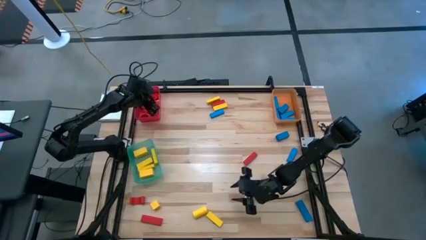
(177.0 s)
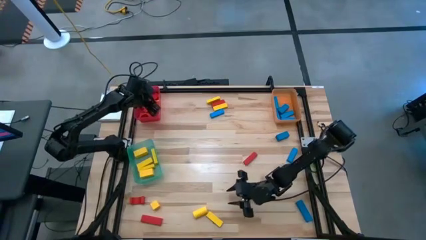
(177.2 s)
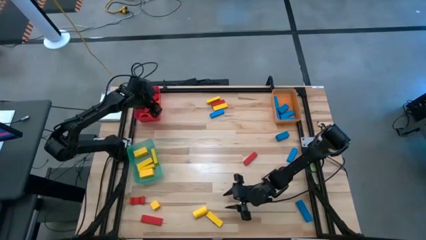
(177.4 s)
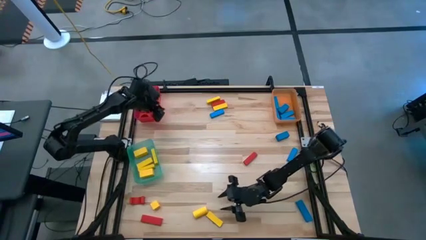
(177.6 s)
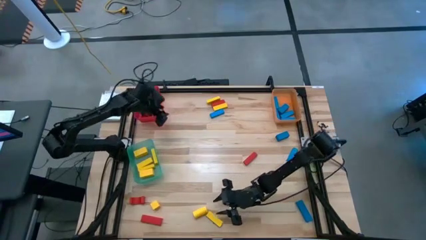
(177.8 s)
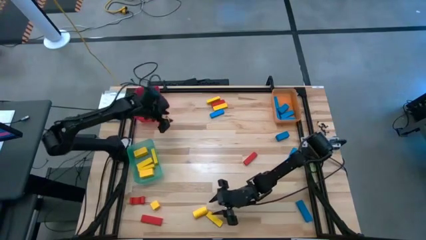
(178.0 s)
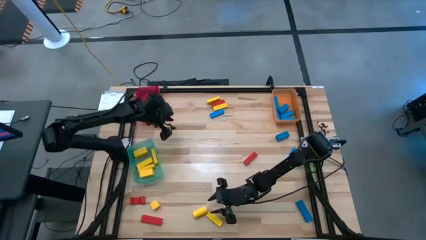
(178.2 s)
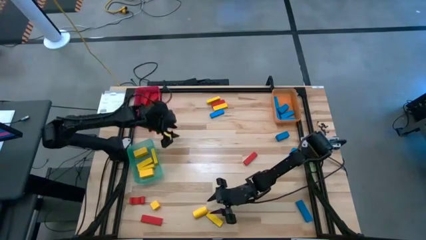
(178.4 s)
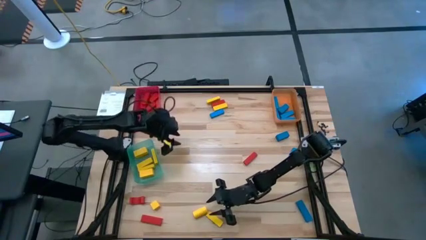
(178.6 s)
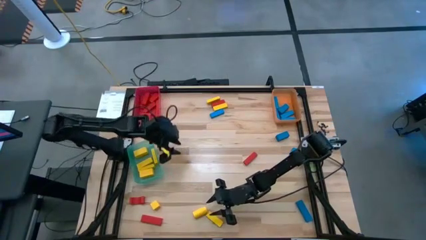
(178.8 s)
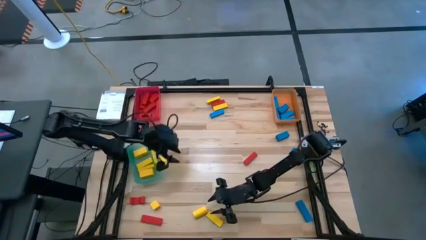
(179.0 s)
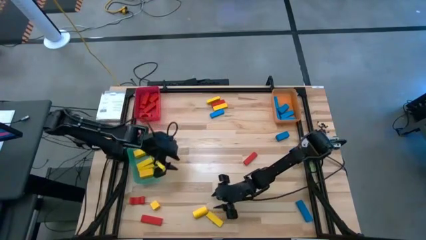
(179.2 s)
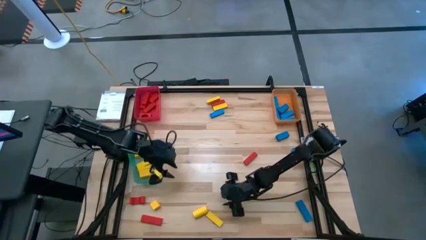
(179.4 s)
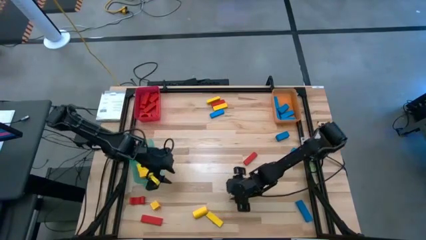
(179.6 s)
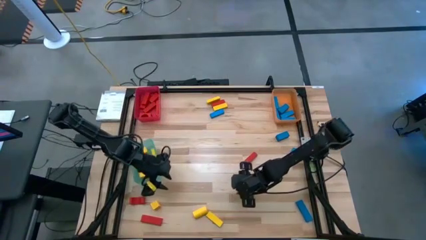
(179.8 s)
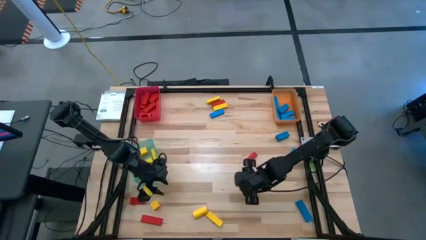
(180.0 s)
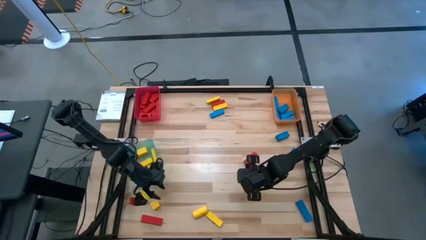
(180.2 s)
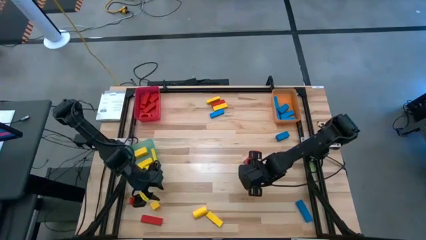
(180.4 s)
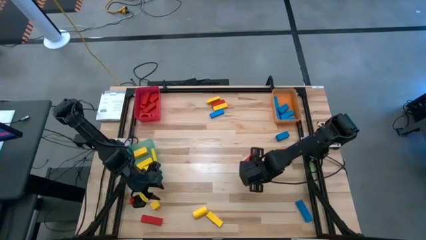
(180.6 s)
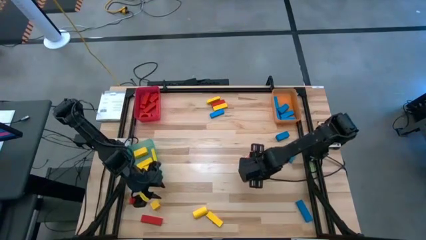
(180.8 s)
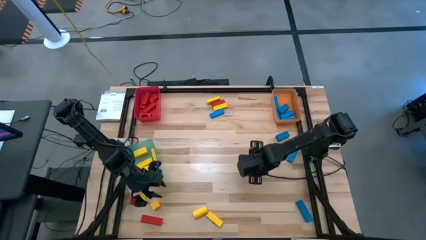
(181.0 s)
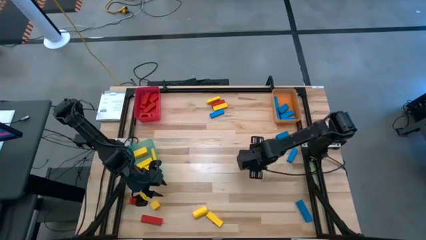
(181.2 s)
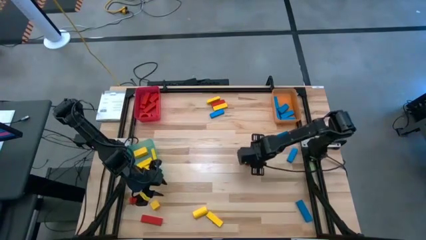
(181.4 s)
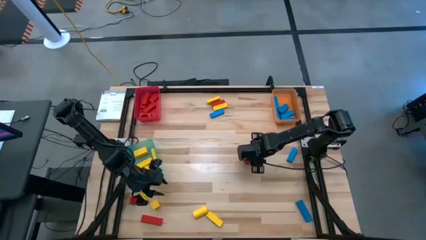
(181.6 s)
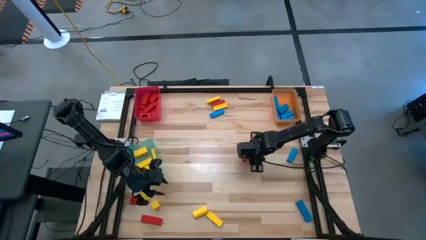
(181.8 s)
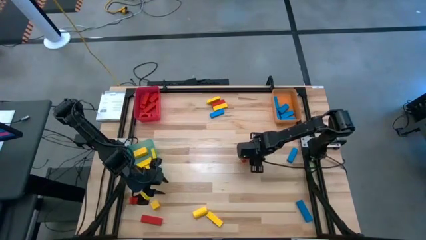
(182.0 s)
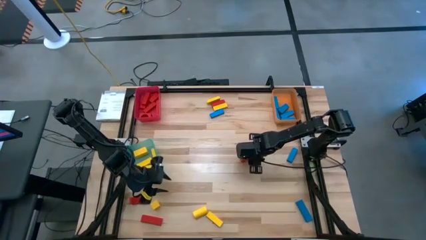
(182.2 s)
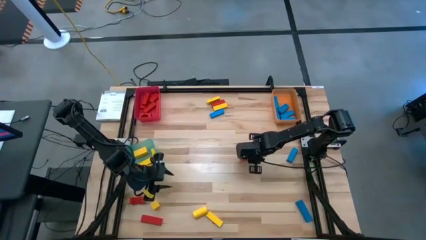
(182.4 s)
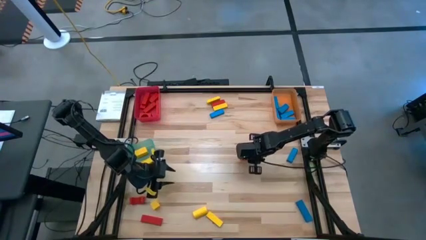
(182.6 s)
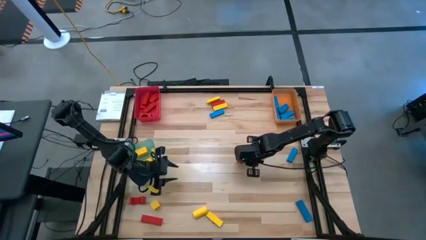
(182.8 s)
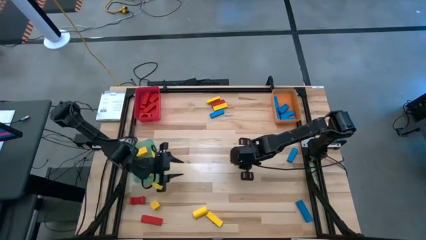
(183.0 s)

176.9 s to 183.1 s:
Task: Sort blocks
Put the red block into the red bin

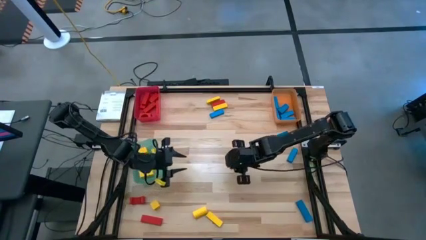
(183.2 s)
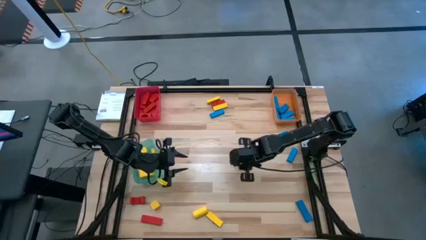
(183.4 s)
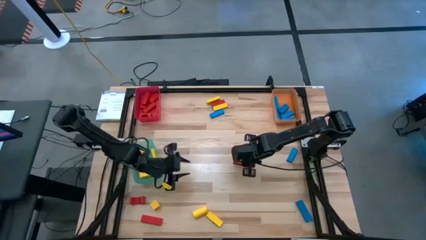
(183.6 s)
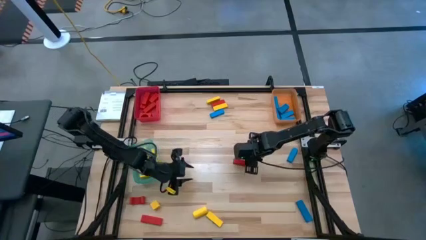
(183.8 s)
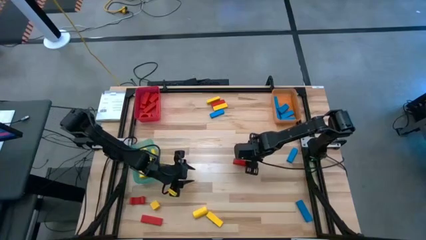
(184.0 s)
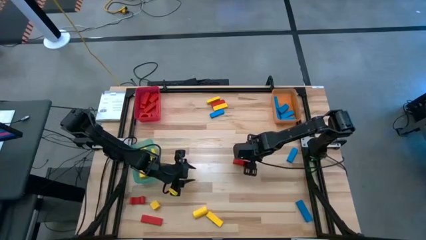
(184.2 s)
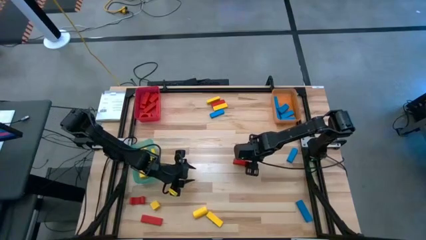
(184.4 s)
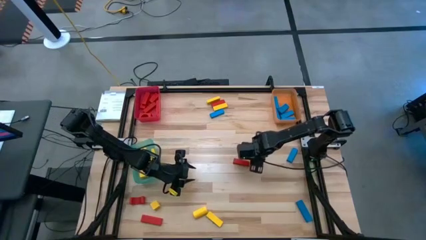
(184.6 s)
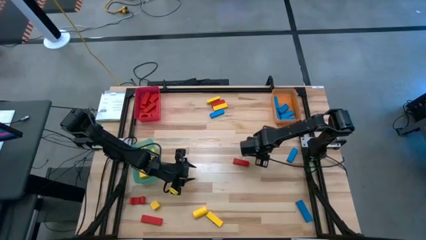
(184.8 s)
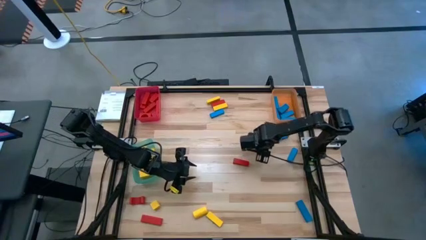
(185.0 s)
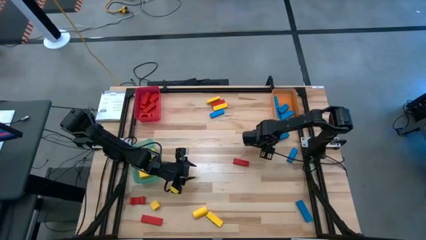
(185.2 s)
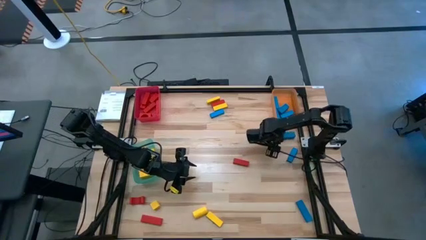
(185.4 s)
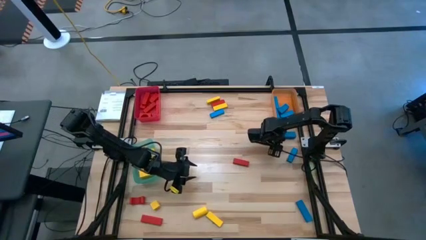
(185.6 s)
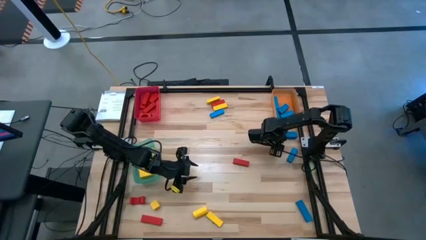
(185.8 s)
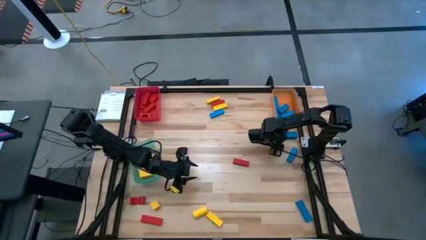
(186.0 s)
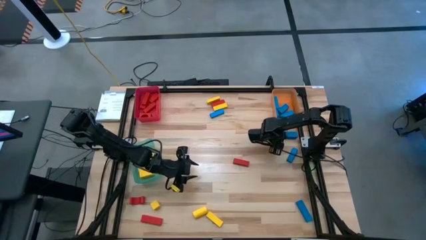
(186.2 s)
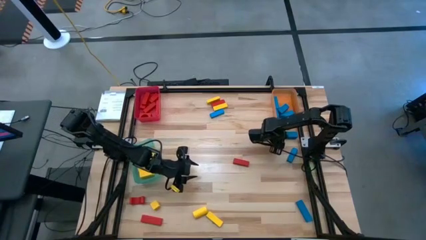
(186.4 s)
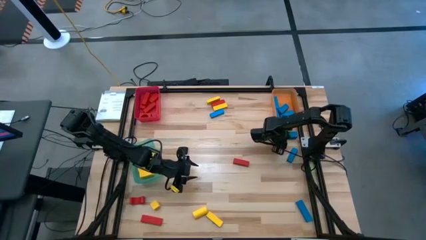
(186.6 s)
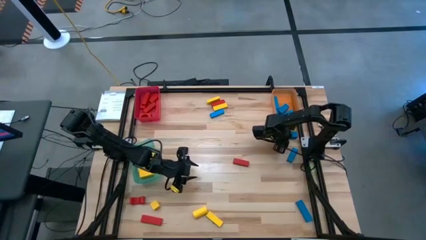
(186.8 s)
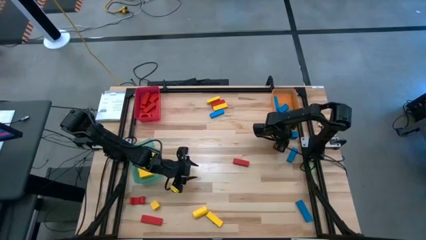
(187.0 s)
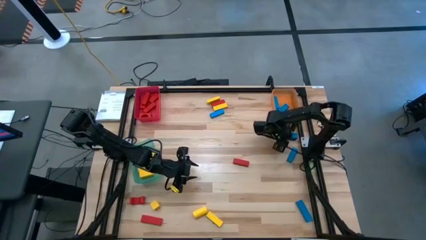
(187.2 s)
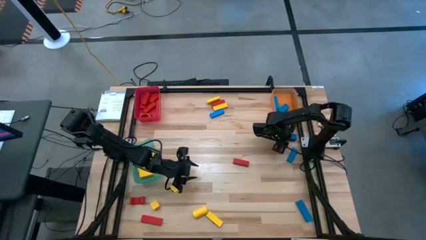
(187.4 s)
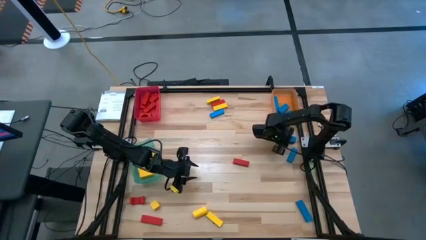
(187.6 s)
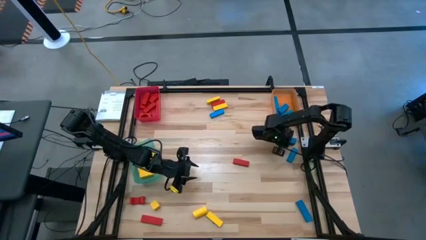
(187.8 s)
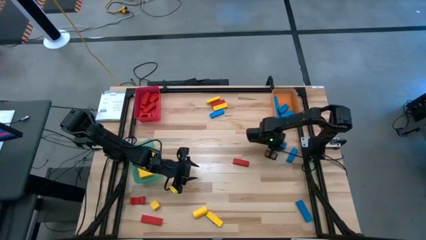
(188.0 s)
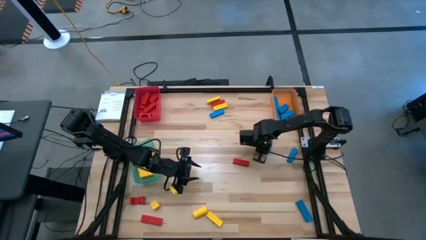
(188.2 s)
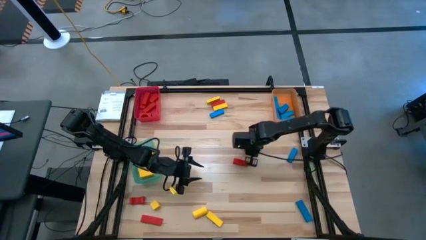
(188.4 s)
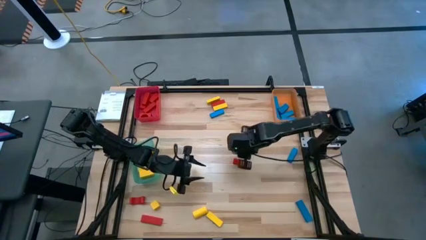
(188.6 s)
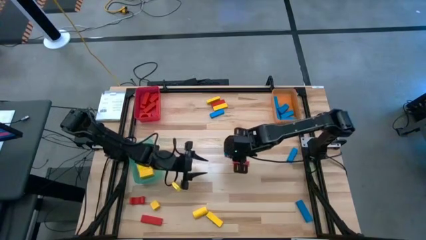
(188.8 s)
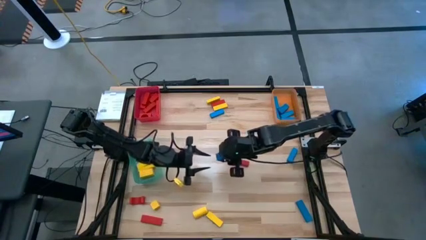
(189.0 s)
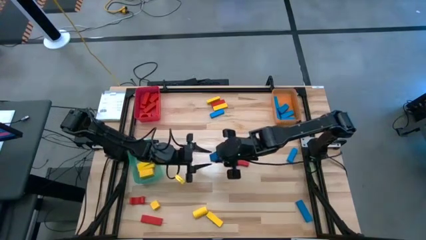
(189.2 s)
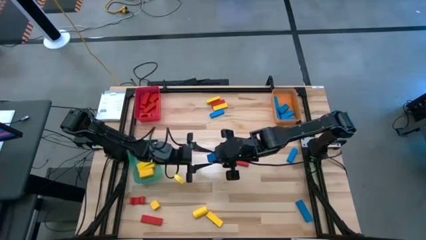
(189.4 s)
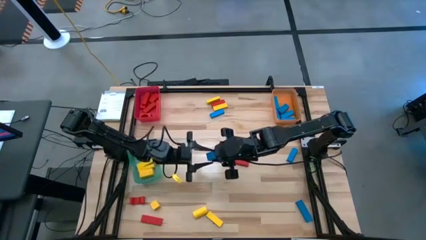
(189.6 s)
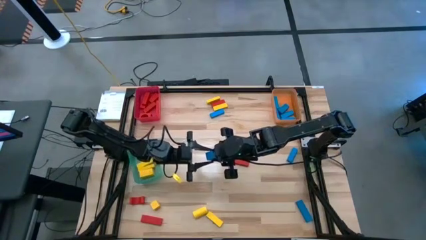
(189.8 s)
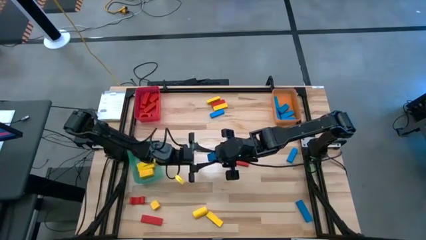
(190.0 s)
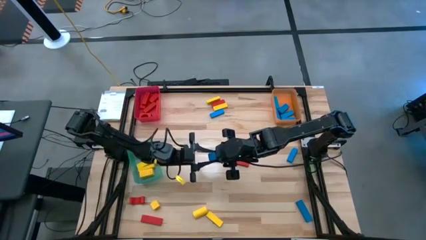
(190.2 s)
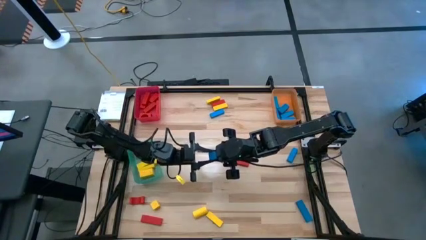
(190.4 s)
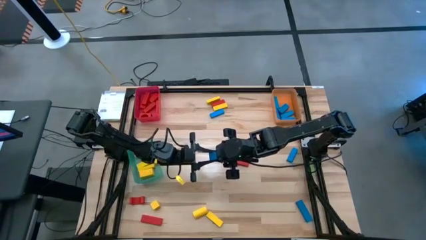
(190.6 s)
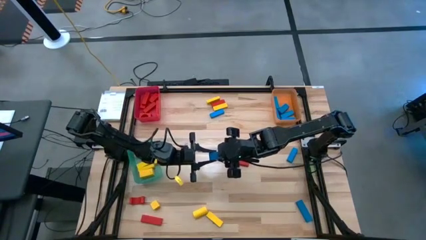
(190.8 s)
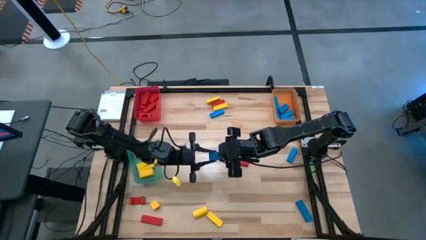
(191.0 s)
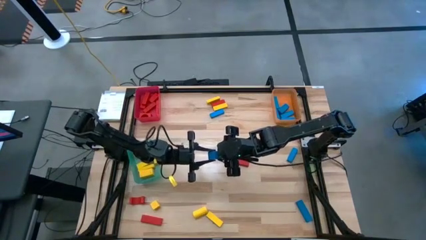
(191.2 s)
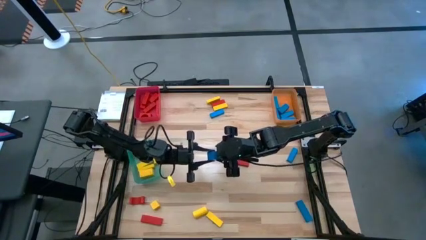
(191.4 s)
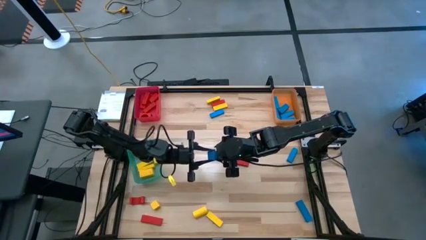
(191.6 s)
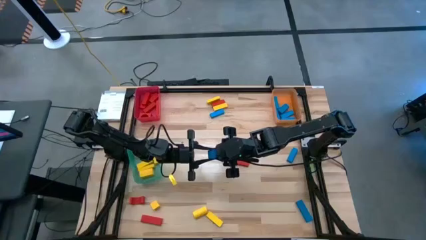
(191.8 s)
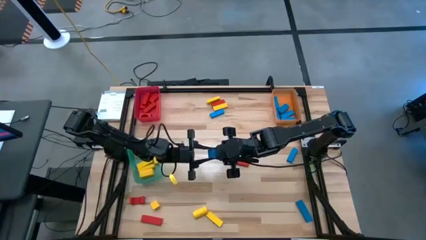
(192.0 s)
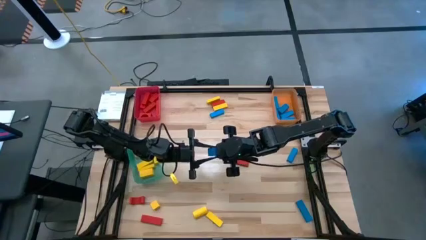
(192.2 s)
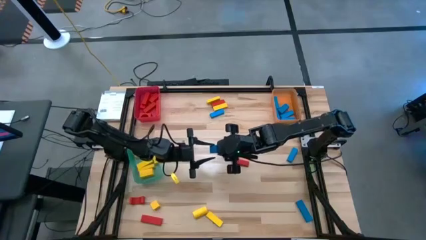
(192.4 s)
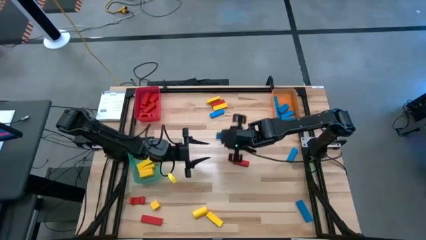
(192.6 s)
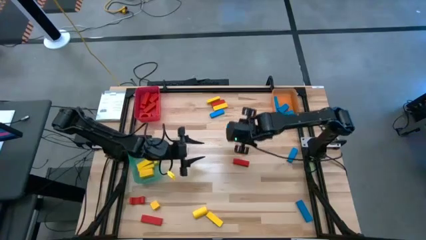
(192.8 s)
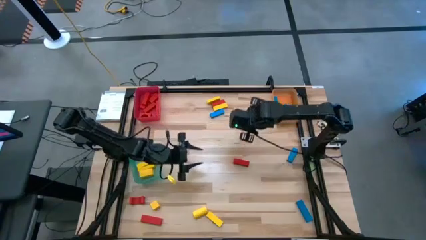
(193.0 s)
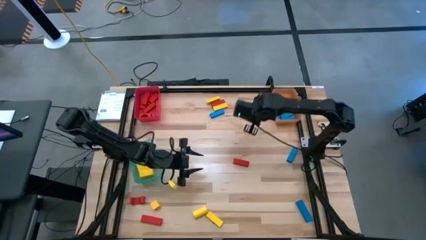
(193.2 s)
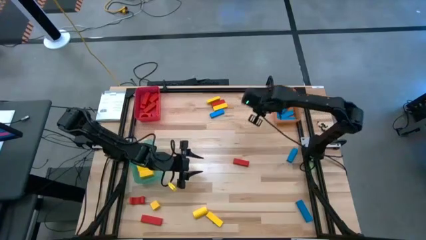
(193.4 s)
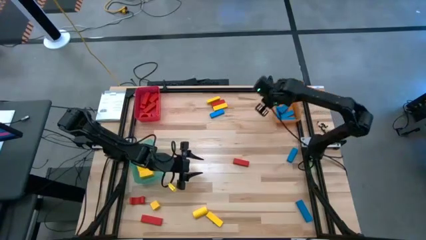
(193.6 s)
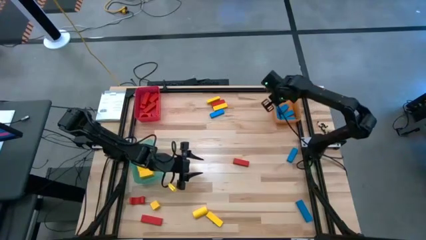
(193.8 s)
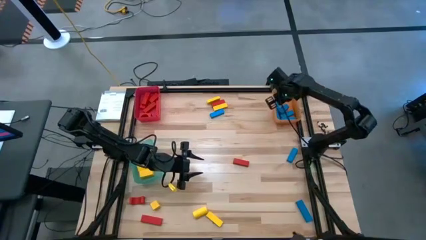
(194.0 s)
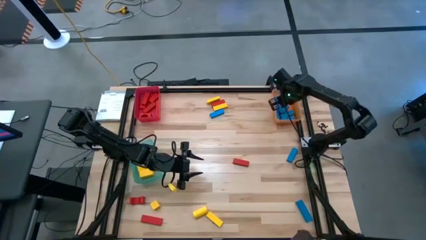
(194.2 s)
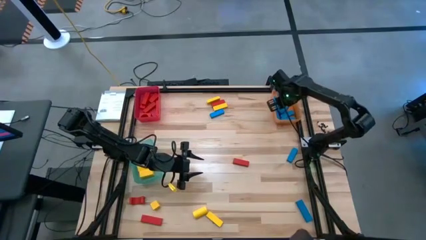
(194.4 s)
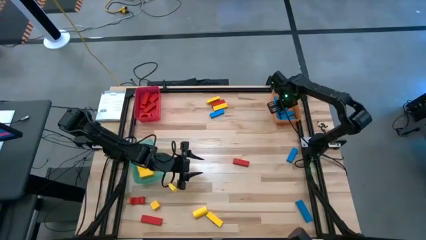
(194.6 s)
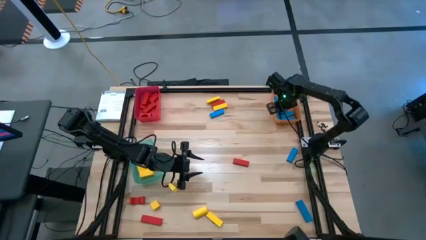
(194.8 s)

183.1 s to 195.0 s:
Put the blue block into the orange bin
